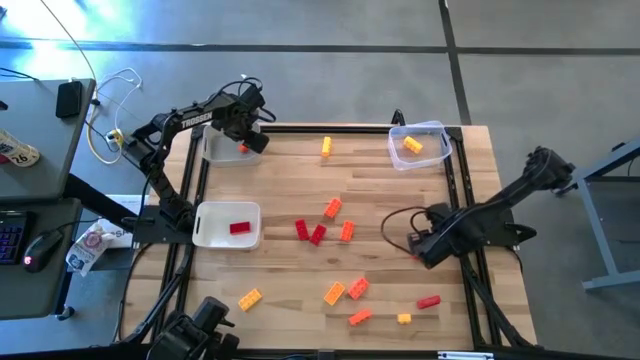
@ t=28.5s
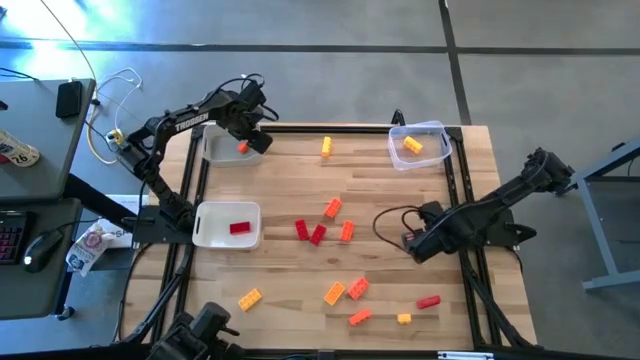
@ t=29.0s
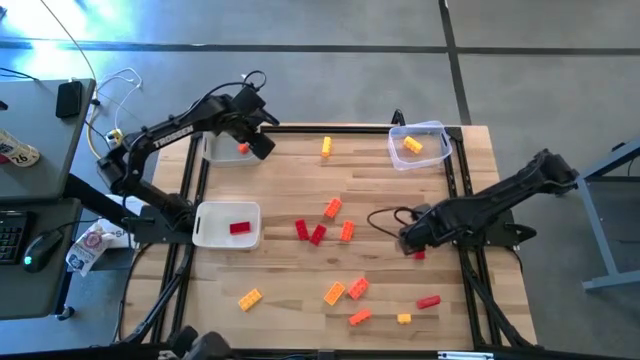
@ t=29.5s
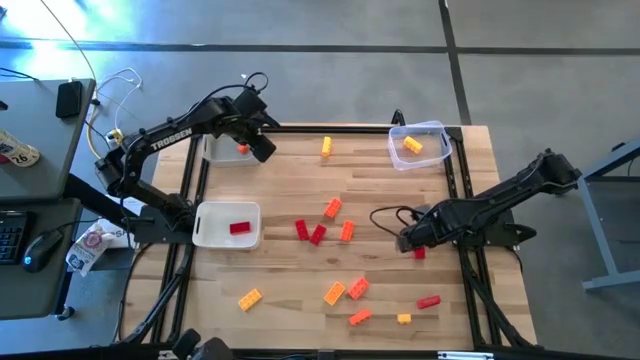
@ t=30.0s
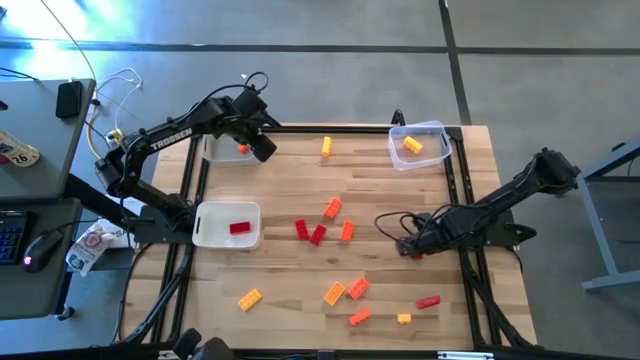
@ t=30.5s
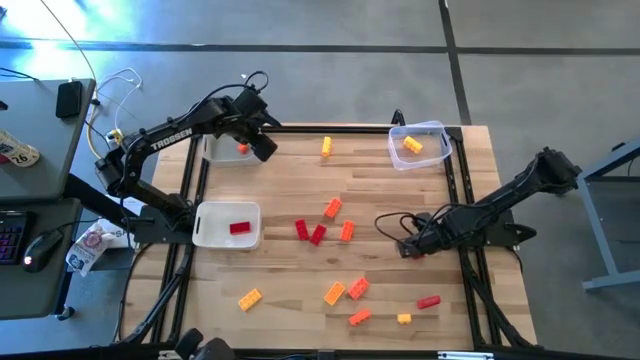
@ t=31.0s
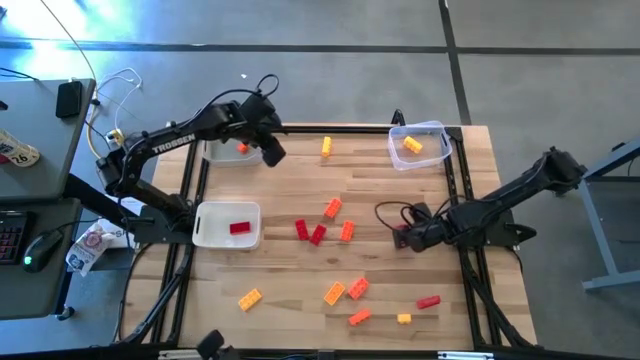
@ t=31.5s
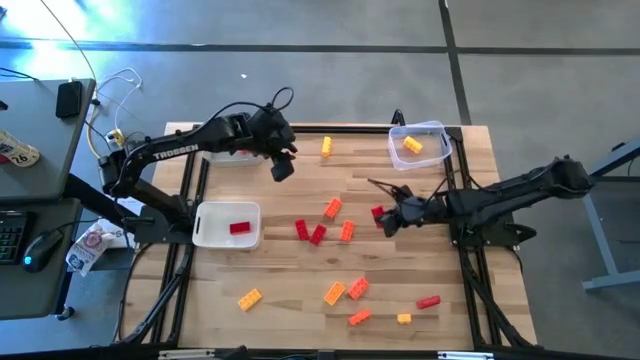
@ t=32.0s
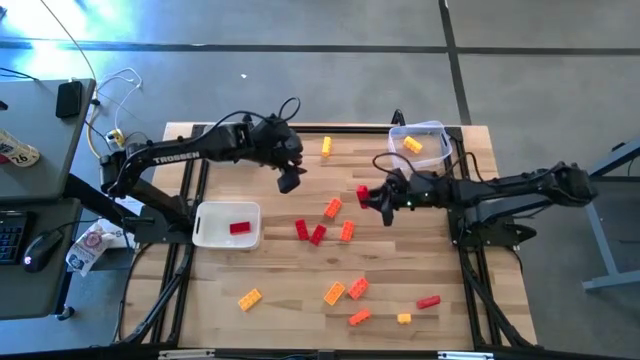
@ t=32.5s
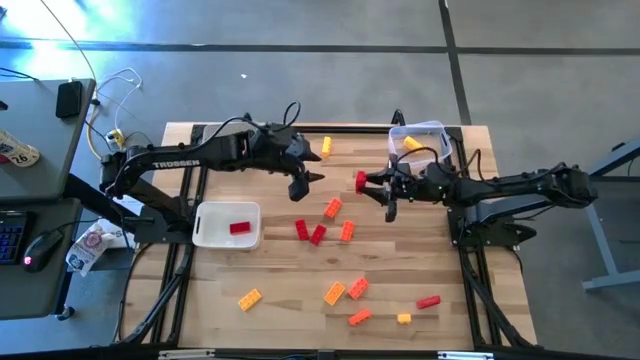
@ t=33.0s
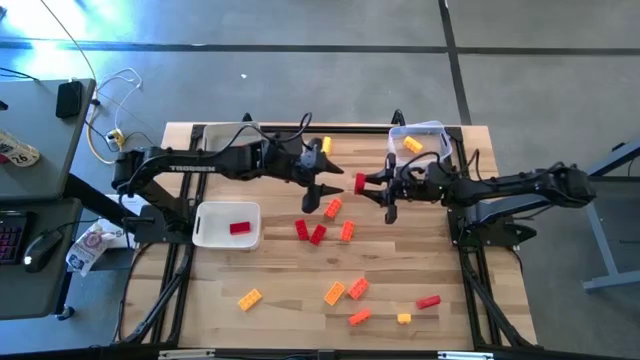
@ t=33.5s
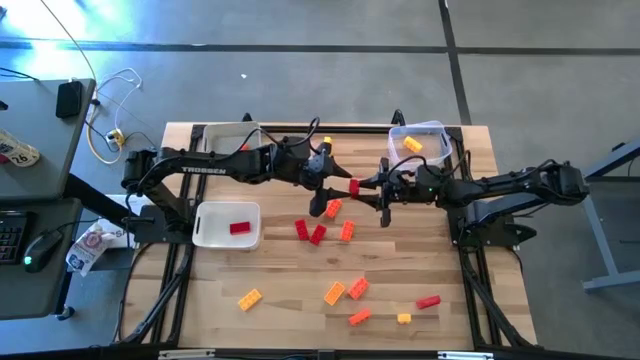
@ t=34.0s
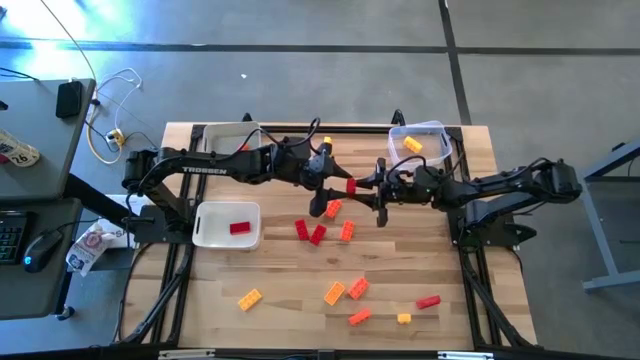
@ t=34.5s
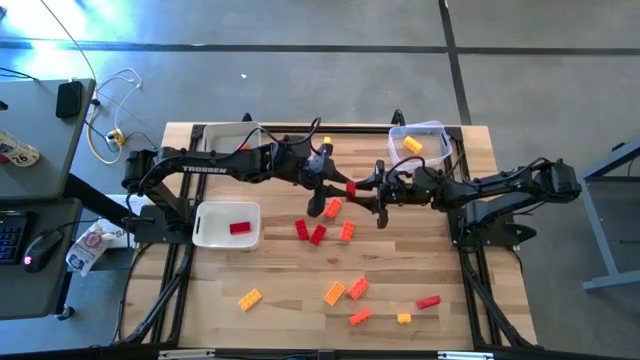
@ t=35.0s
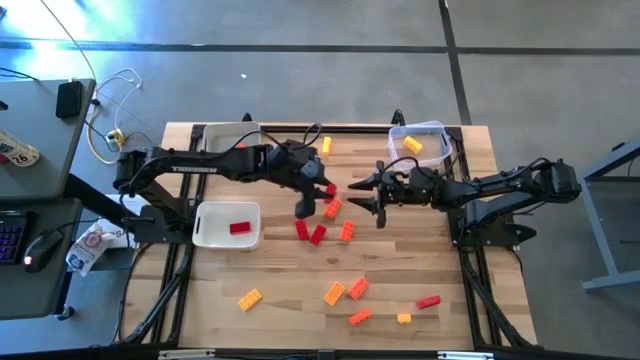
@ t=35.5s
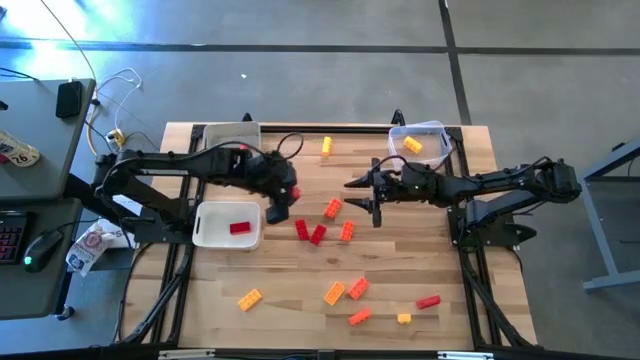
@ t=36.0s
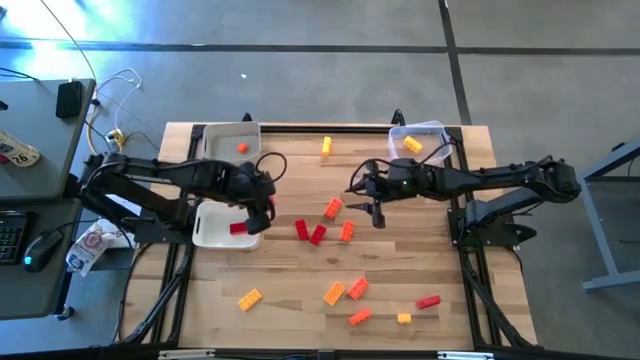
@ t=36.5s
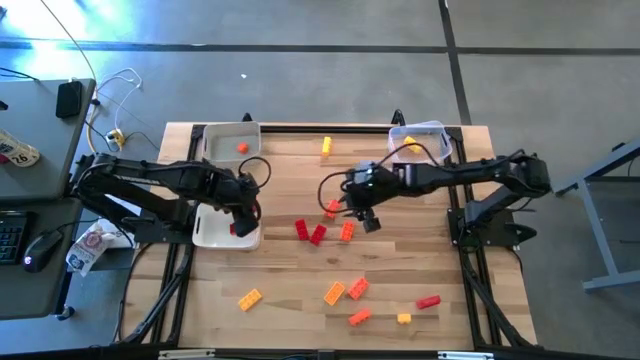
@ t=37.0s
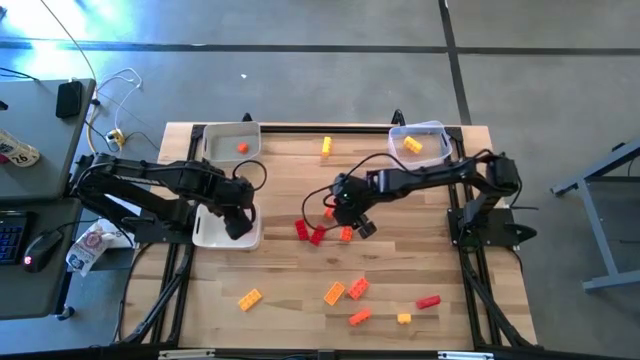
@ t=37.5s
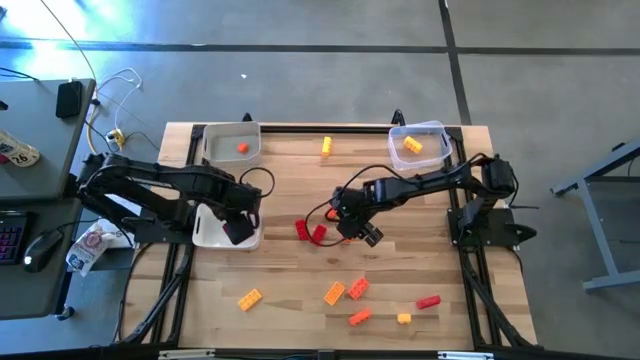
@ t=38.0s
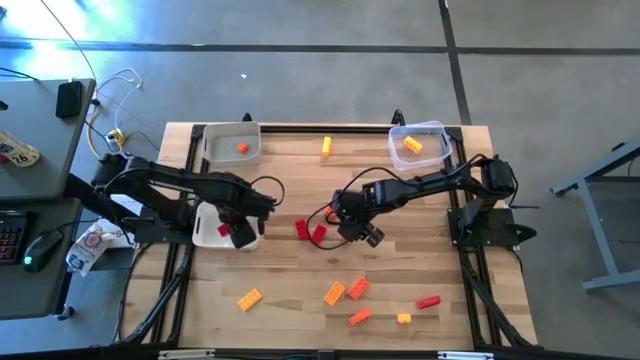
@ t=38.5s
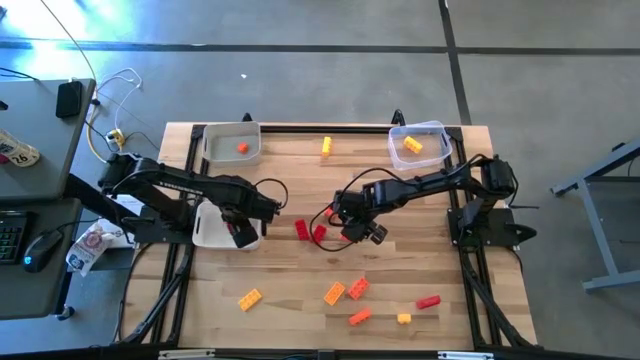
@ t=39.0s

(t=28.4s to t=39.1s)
Task: Sort & place blocks by color
Put the red game piece into the white bin

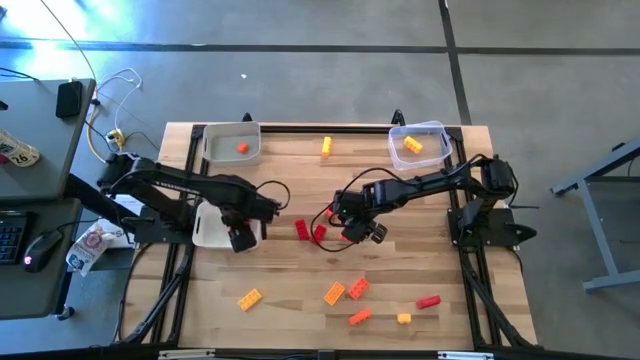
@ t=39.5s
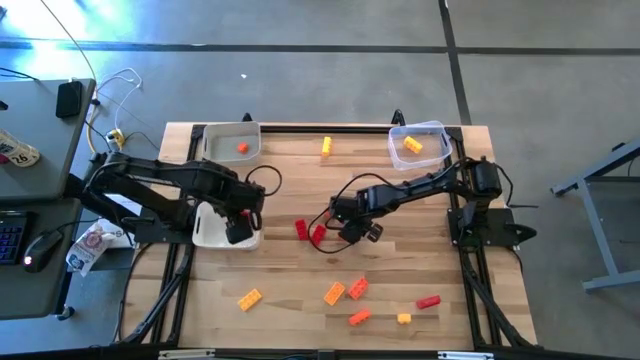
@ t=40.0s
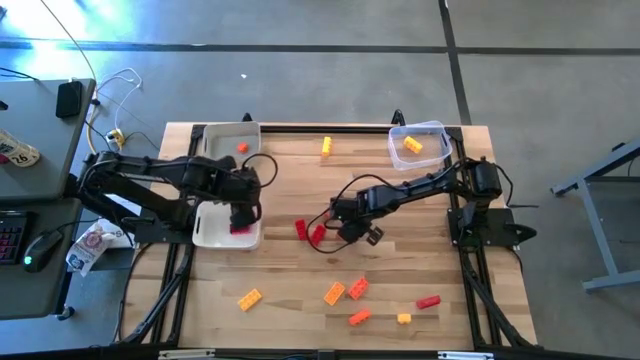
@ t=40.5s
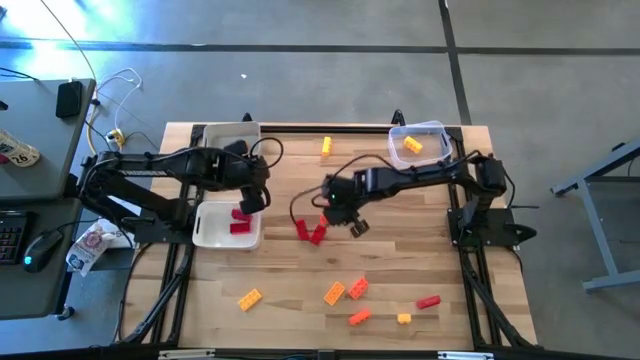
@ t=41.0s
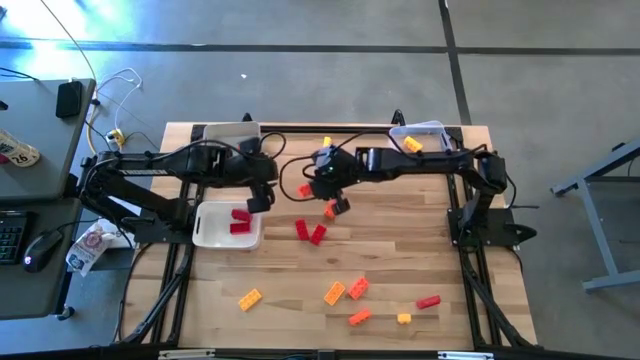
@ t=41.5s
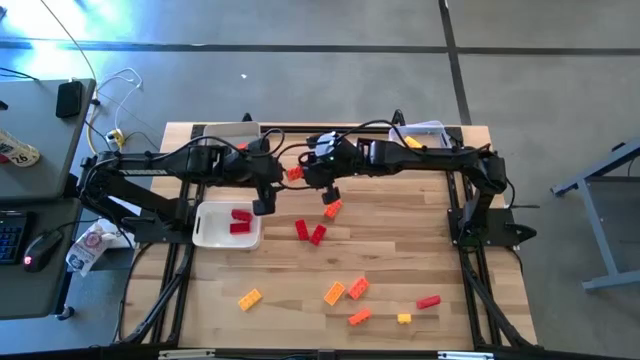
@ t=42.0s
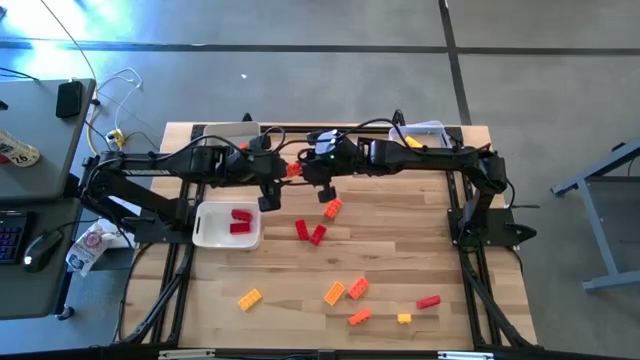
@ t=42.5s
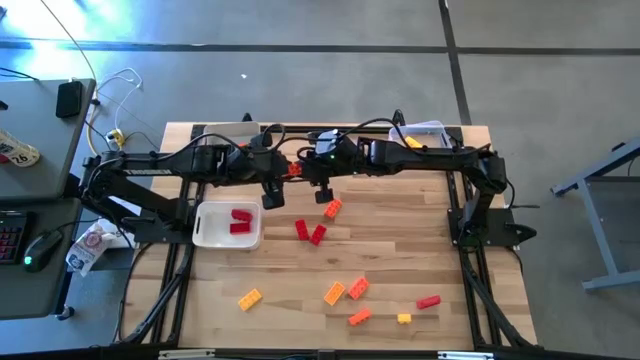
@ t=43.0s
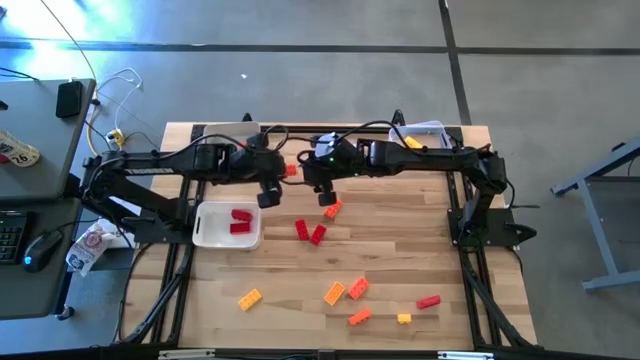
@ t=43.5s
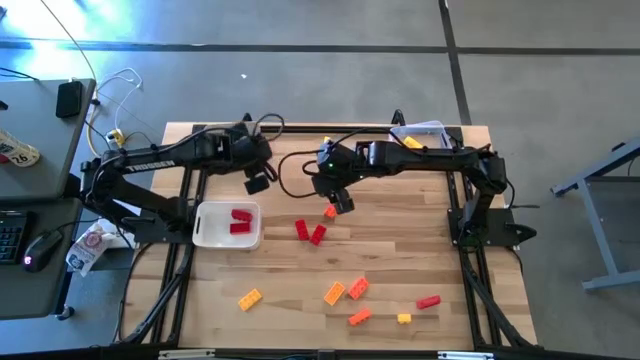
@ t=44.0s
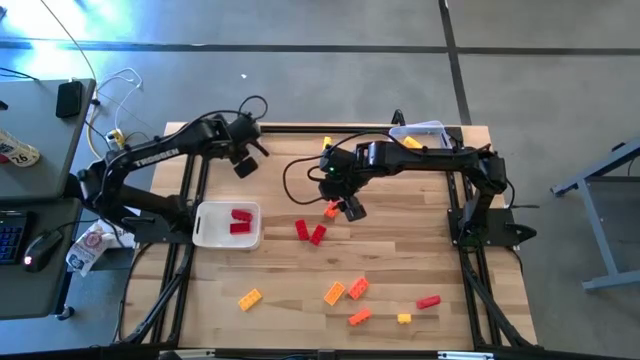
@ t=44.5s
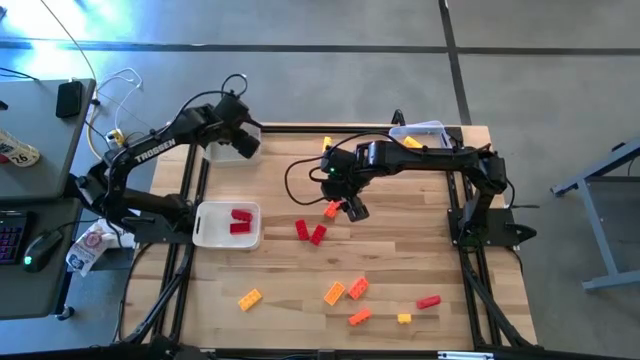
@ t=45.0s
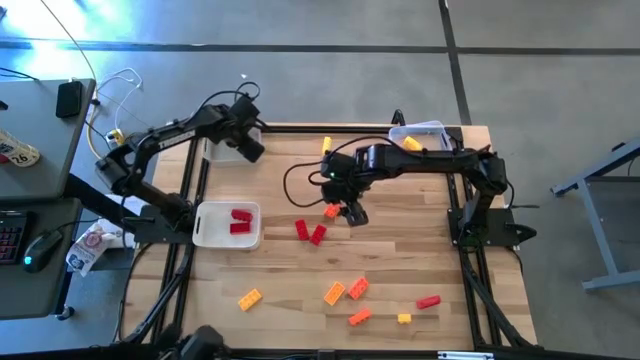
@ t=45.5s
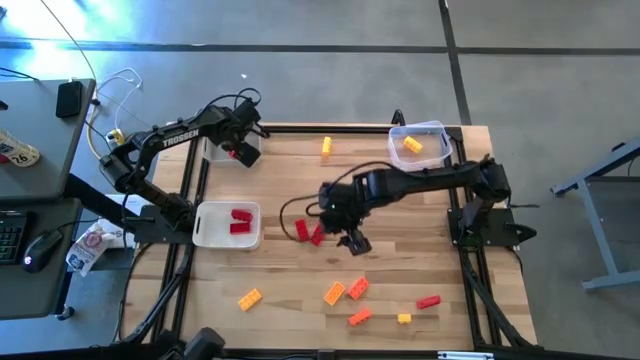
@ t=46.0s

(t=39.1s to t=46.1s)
Put the orange game piece into the gray bin

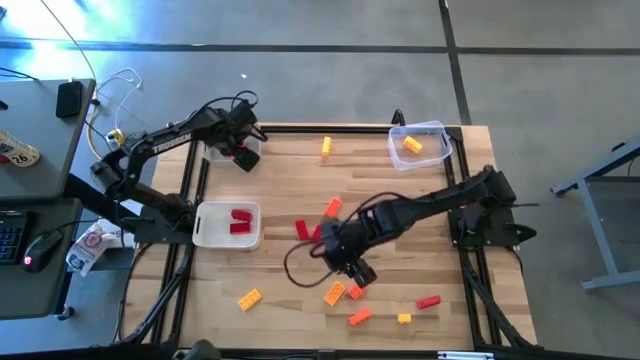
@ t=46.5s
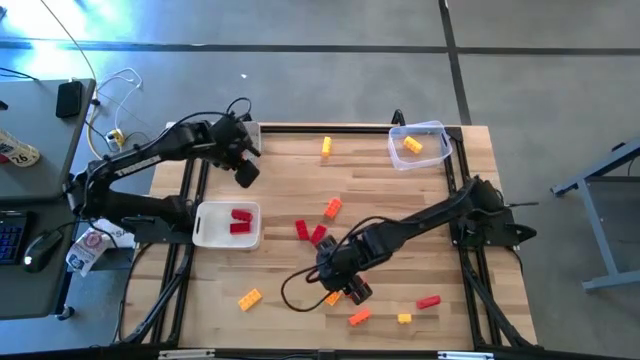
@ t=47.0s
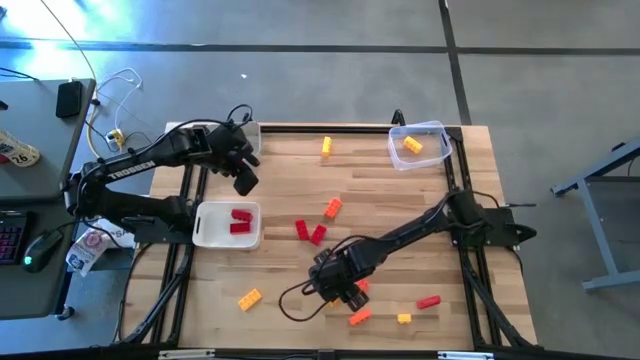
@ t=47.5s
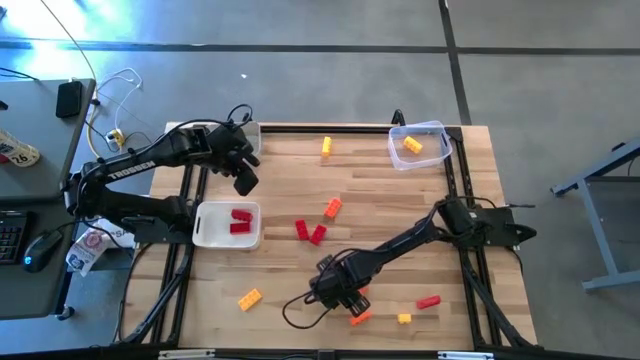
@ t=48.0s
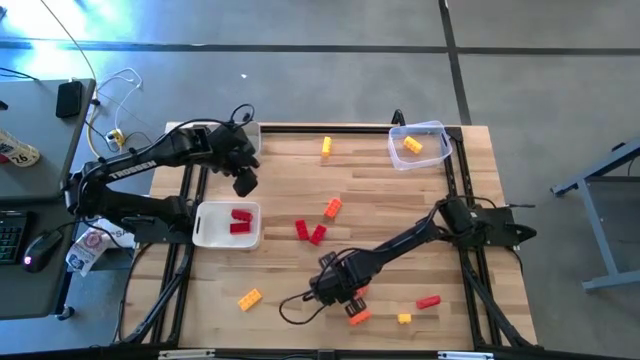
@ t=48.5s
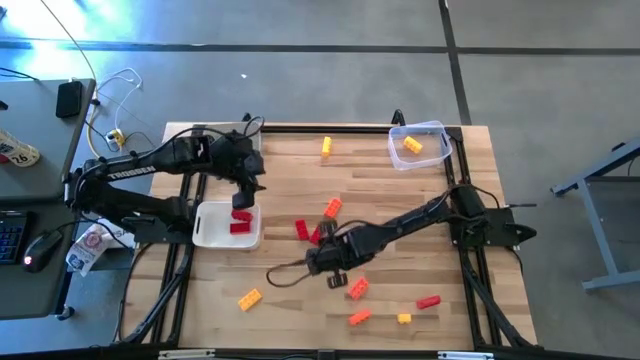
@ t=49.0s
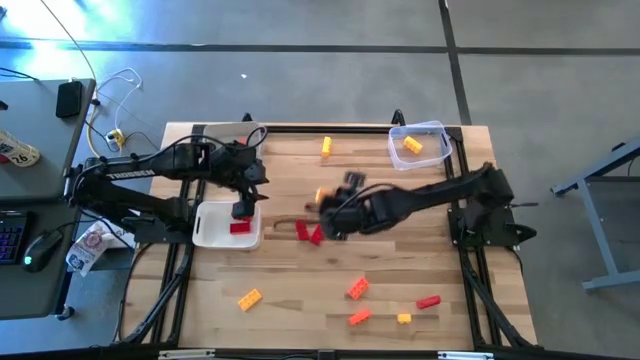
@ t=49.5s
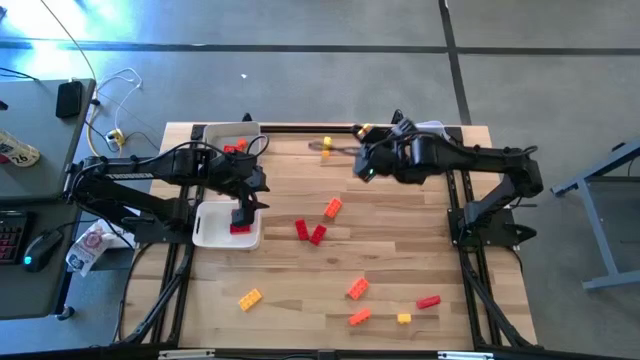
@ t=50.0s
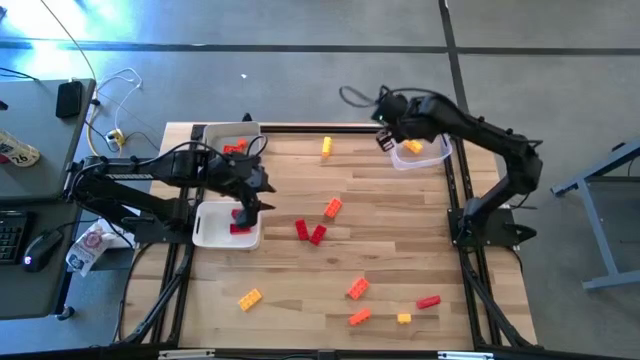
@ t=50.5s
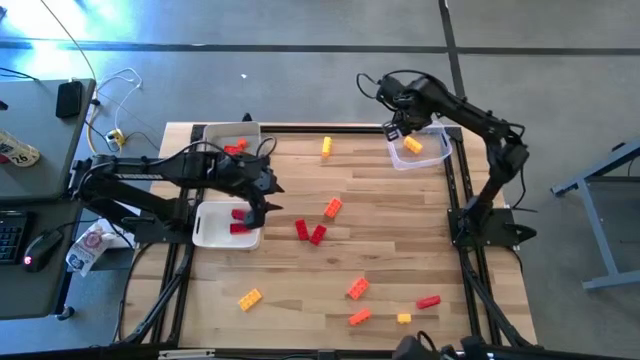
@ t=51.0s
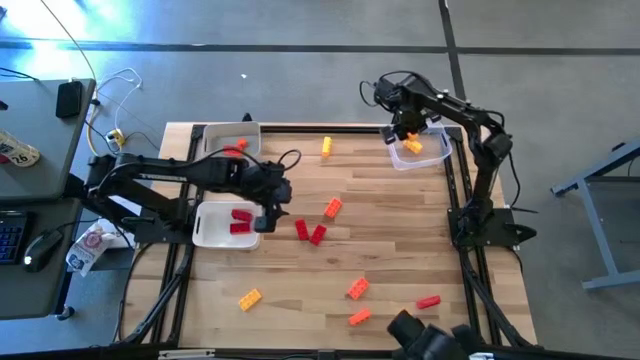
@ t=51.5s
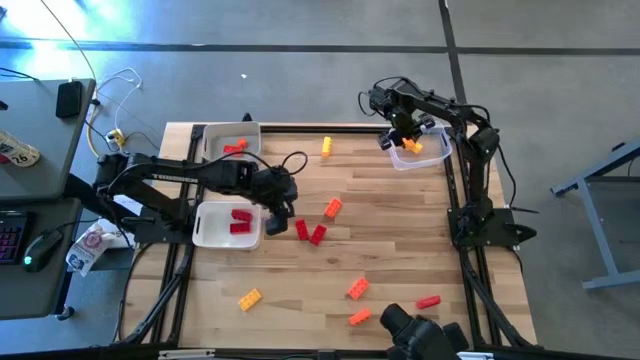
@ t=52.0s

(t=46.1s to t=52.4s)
Put the yellow game piece into the transparent bin
